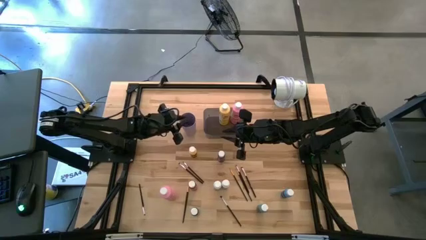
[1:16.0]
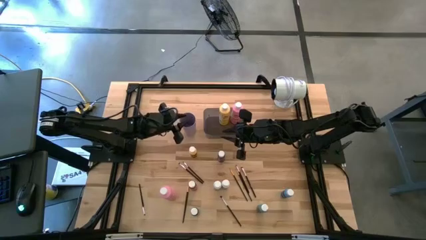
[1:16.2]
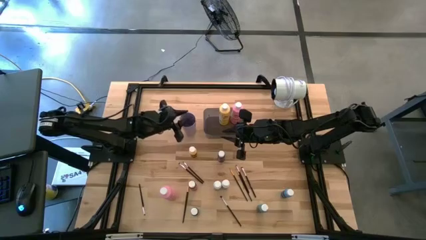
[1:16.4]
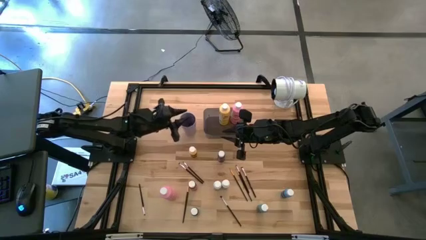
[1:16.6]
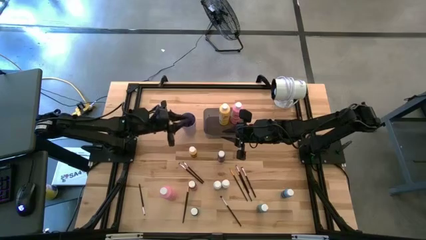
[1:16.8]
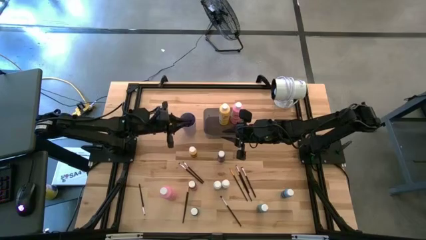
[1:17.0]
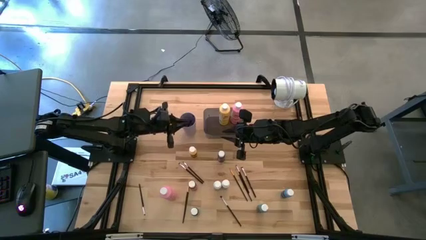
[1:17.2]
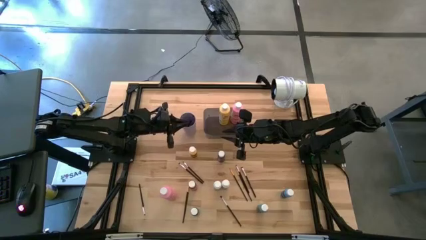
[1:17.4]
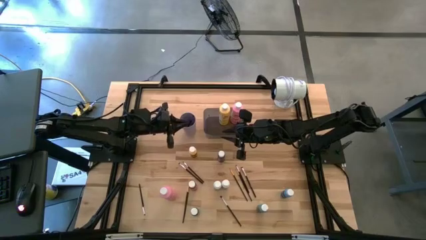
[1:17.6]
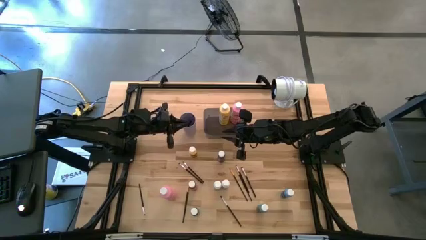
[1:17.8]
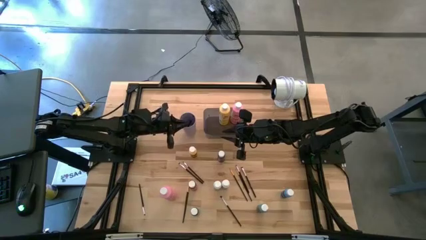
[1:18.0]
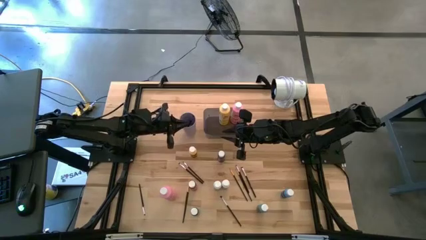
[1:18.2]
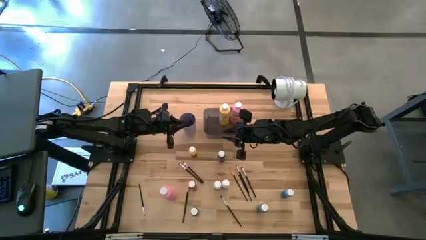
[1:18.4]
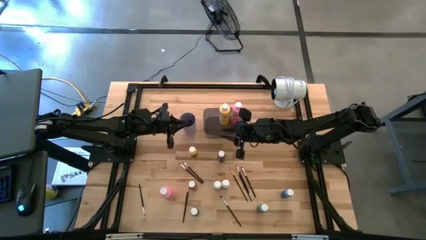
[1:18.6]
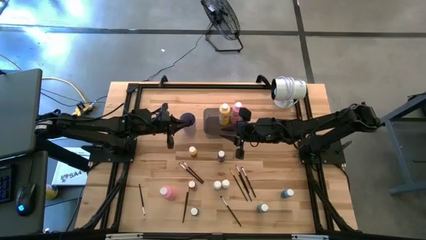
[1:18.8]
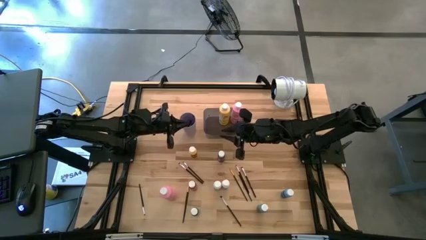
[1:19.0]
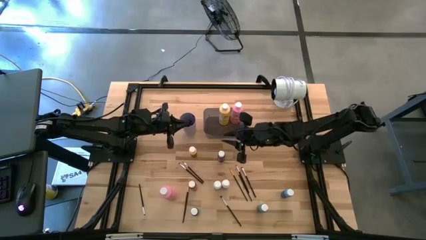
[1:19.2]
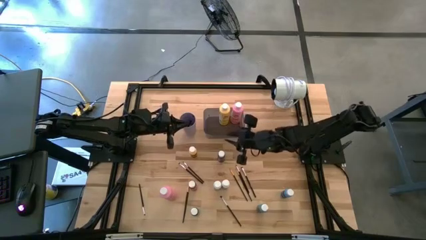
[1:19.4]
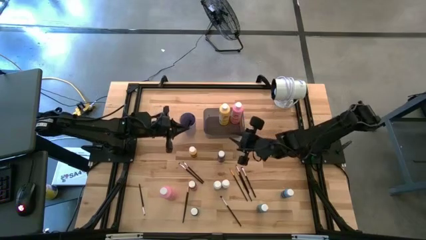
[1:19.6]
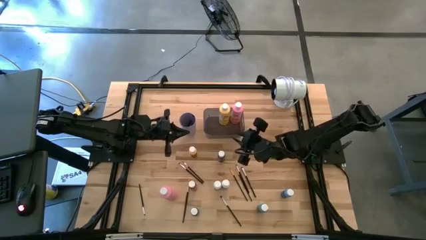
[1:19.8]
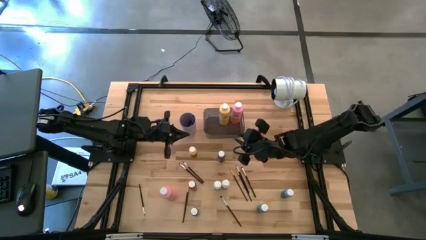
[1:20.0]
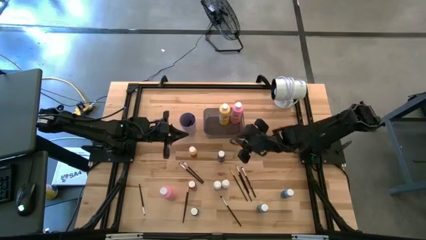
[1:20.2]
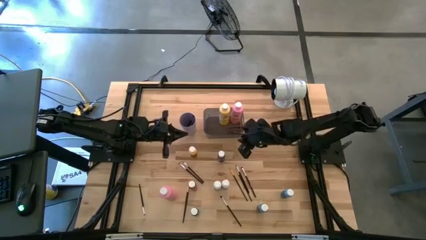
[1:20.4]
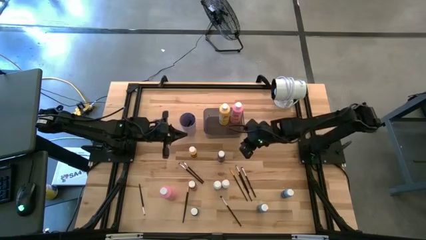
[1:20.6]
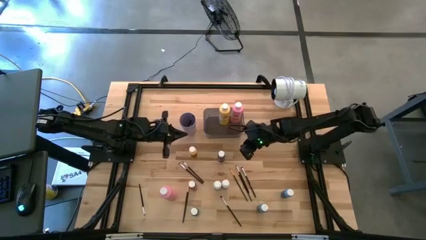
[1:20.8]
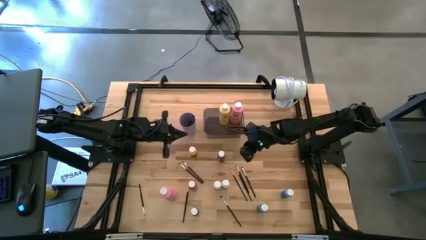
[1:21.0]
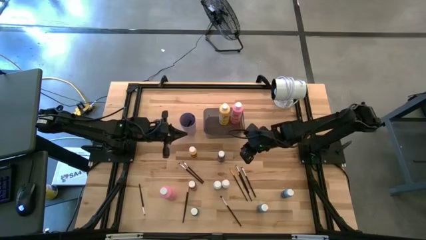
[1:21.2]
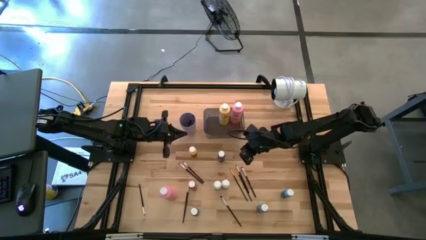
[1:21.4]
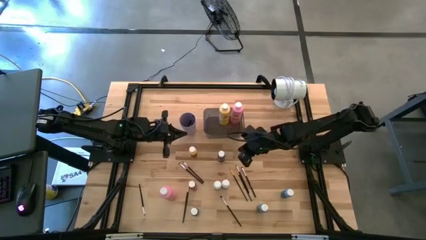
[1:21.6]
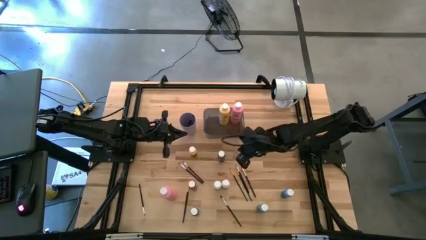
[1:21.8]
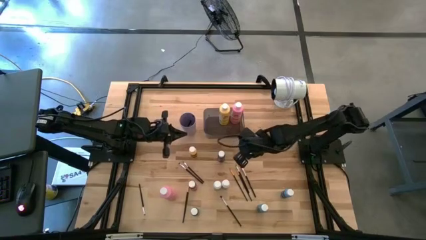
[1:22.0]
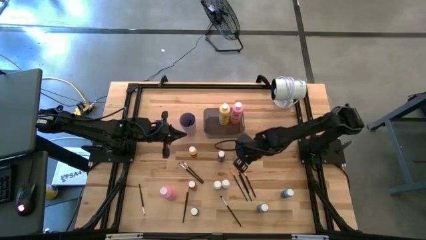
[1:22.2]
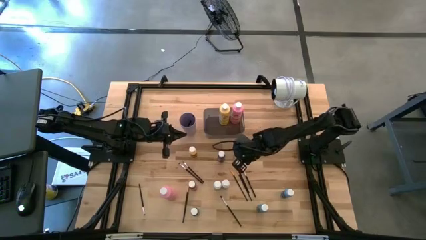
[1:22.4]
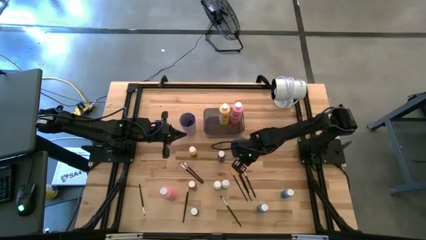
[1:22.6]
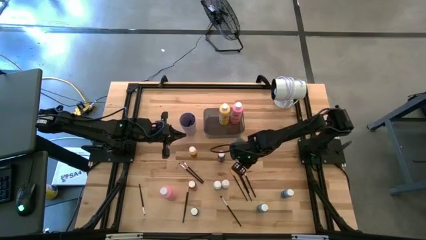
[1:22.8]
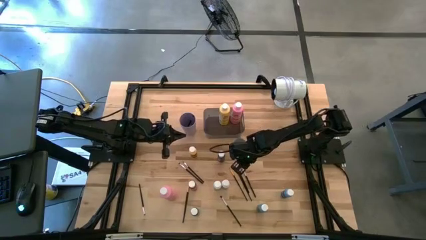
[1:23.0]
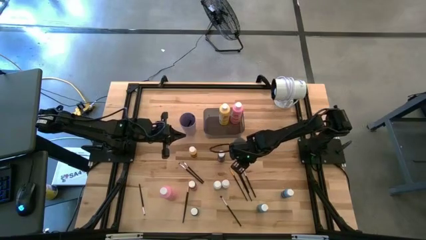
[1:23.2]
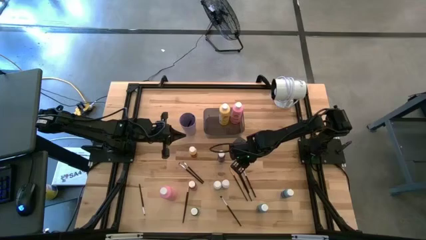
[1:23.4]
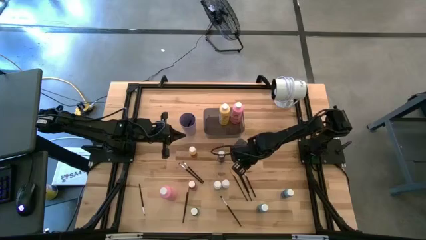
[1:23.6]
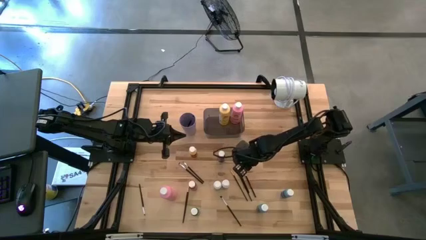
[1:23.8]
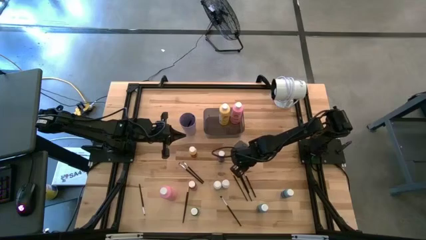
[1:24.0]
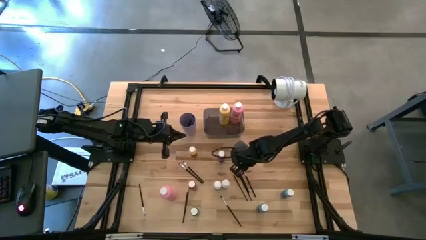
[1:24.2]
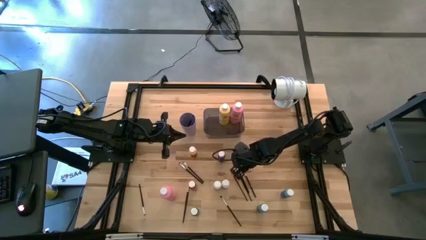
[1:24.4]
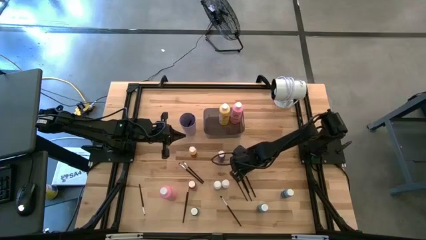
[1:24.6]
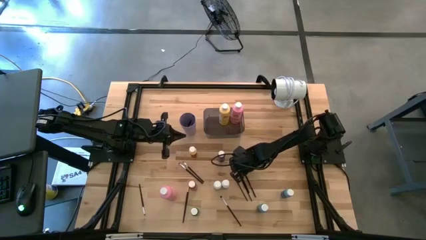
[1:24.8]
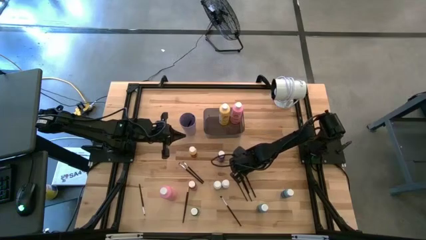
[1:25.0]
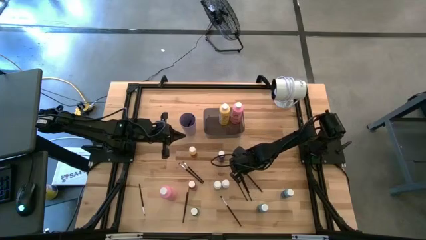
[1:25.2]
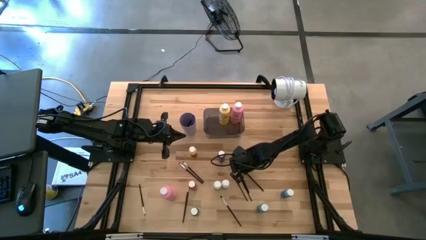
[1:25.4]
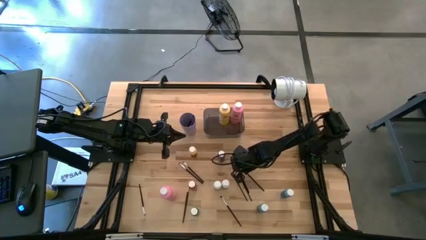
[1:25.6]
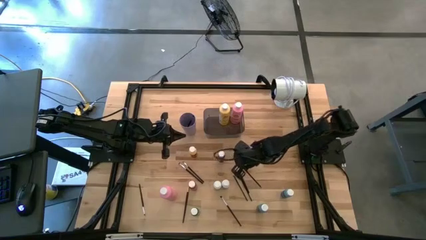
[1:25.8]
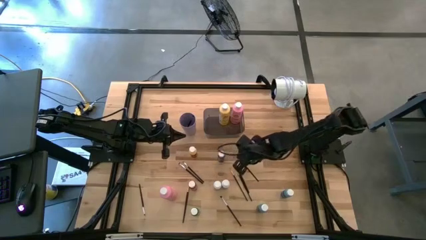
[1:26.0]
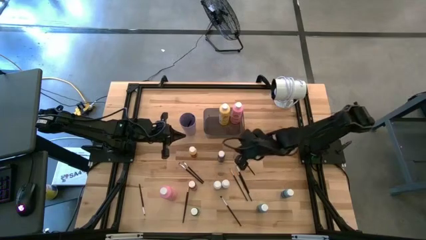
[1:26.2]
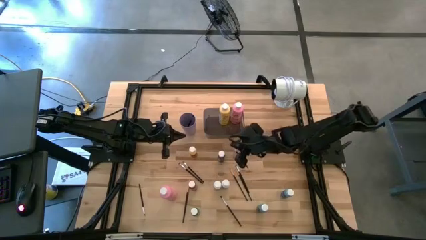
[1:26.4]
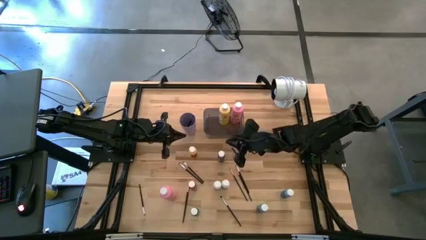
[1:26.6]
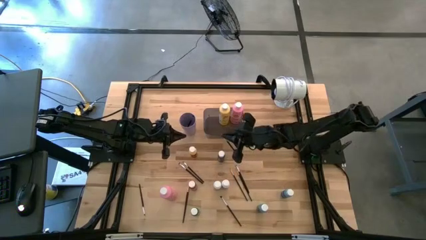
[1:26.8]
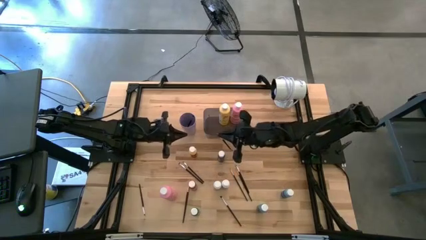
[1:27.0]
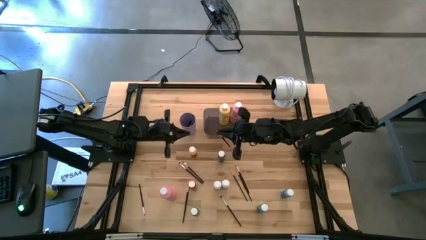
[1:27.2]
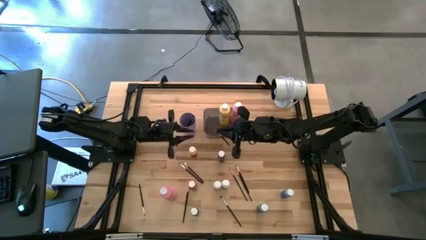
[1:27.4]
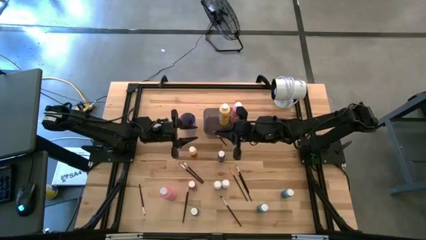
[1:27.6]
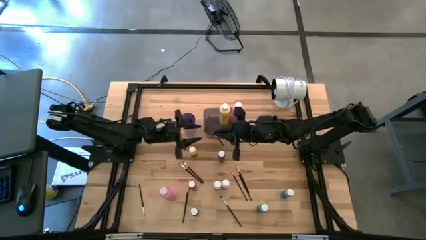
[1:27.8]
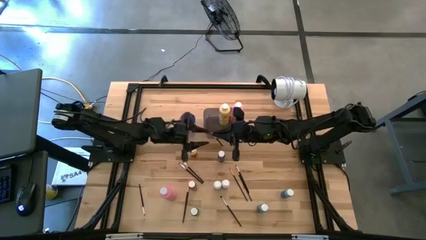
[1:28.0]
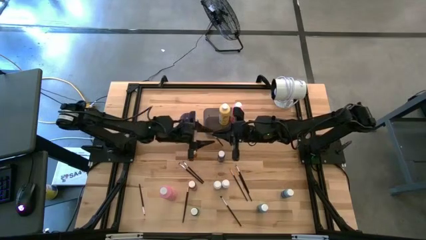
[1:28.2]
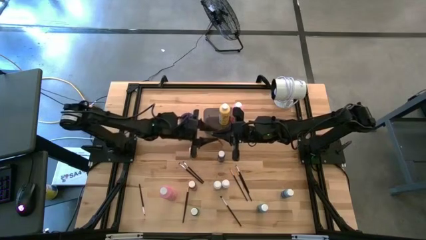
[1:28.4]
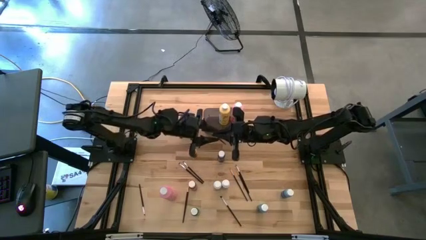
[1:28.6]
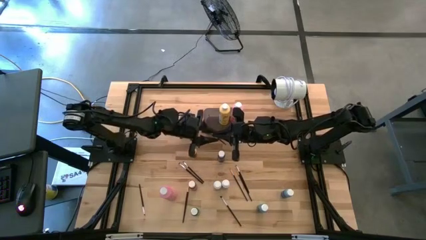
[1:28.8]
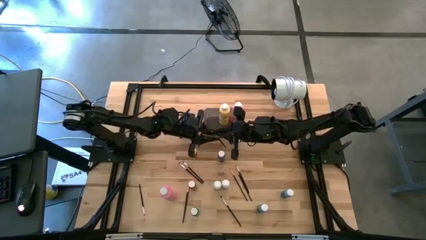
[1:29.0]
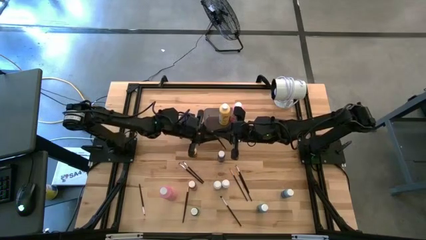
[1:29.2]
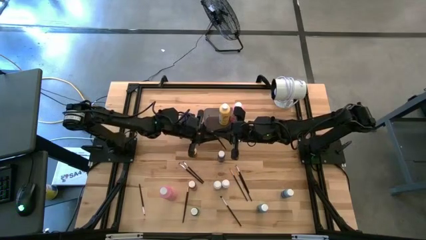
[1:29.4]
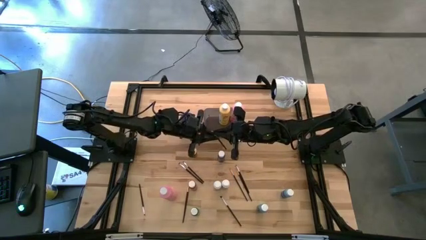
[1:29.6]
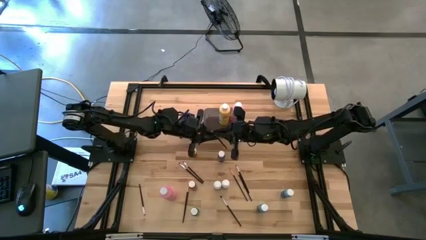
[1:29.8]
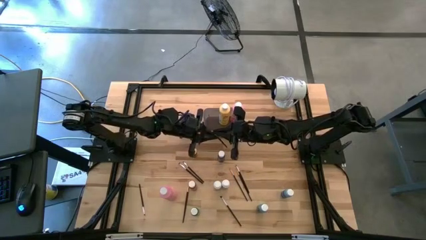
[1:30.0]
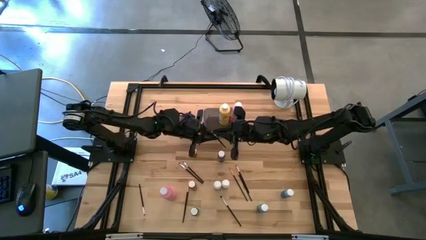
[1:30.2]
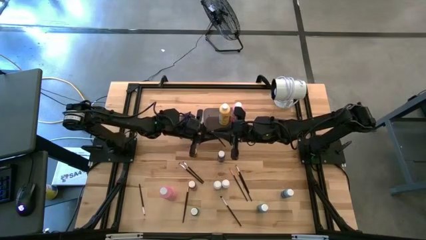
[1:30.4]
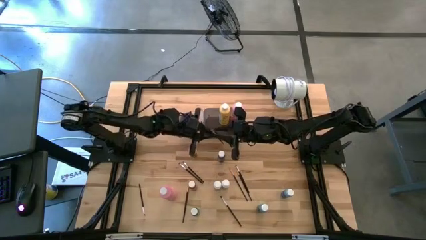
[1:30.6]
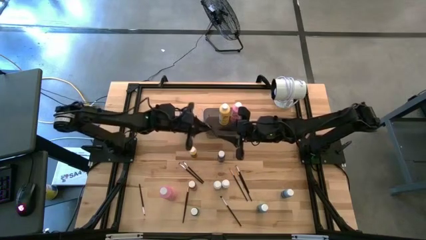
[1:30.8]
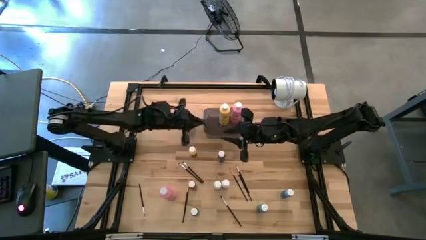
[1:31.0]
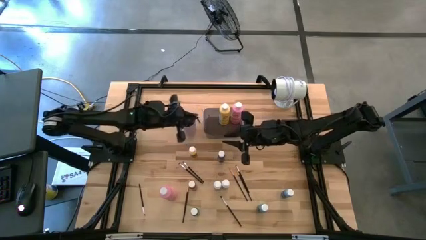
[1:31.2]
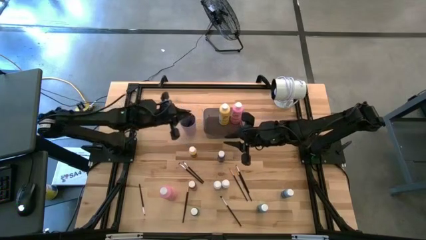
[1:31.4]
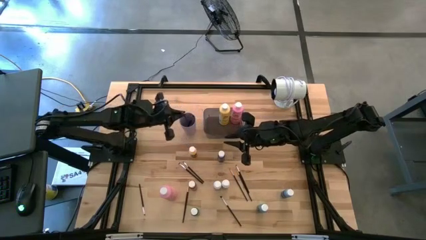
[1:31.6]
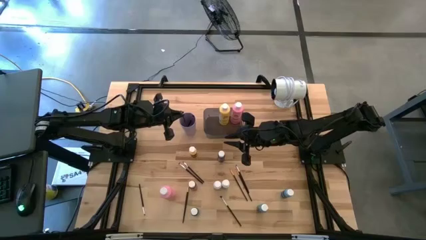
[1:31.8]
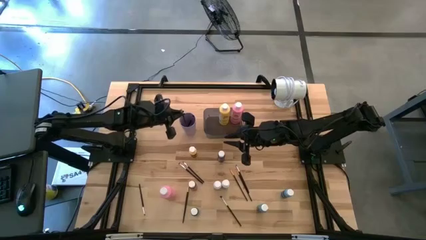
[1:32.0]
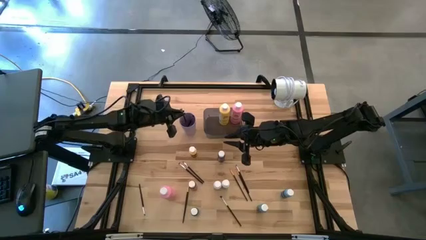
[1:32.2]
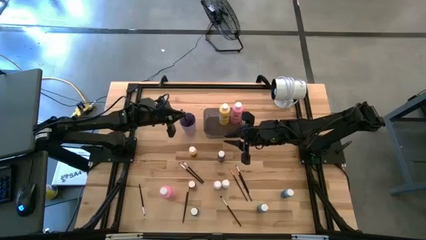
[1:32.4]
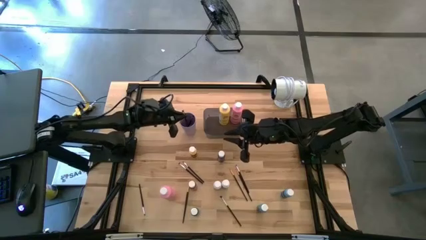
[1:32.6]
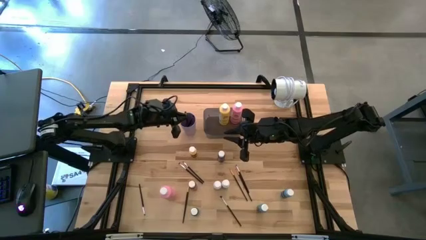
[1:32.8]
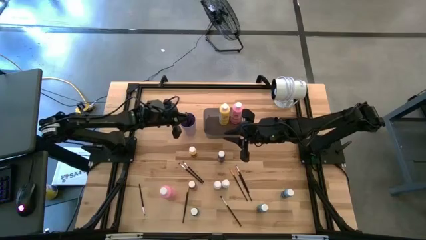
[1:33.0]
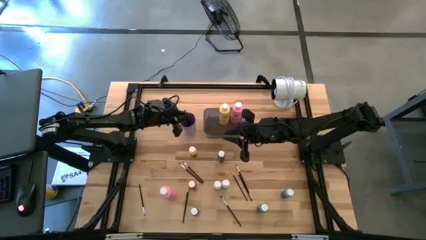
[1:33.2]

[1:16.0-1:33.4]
Task: Pick & Place Paint Supplies
Put the silver paint brush into the purple cup
